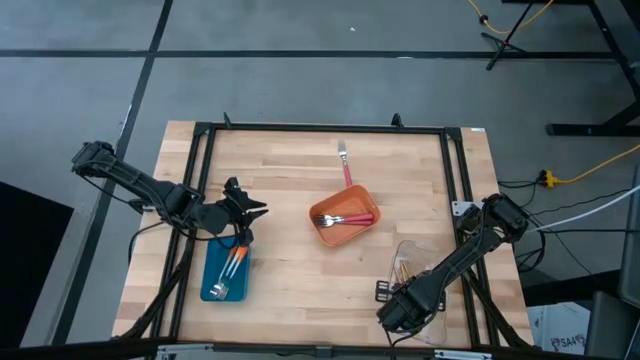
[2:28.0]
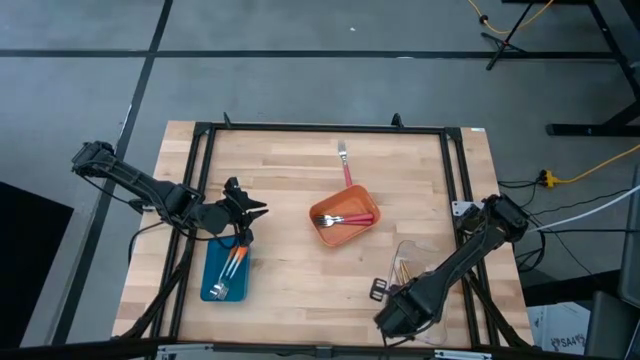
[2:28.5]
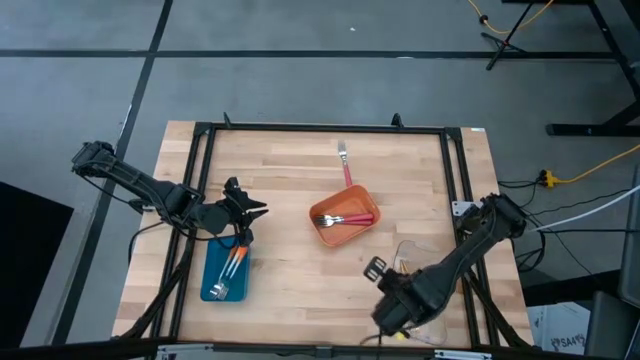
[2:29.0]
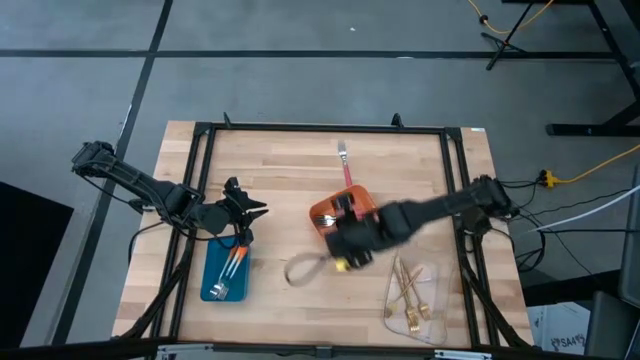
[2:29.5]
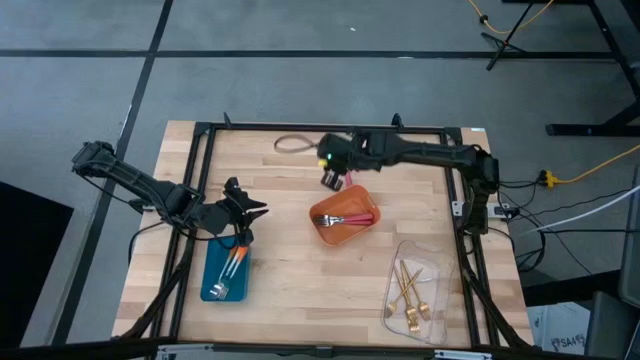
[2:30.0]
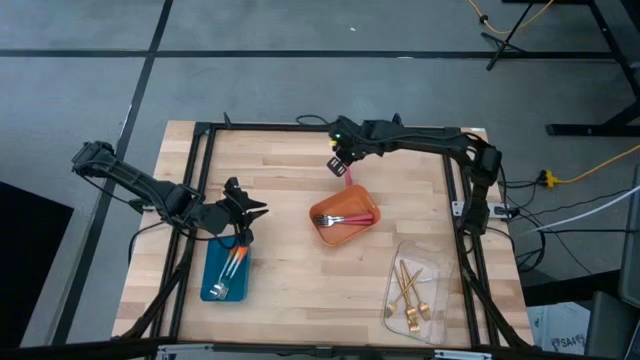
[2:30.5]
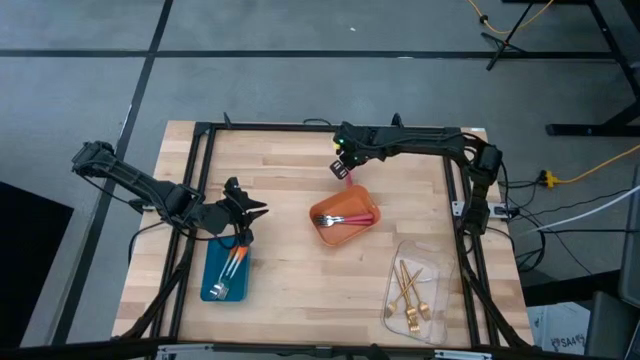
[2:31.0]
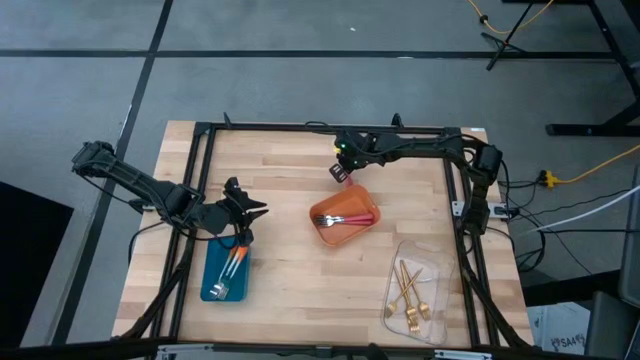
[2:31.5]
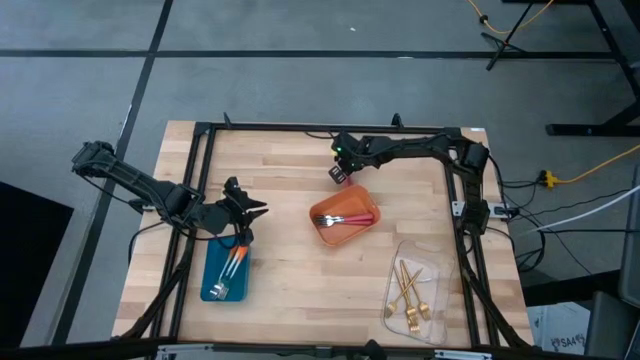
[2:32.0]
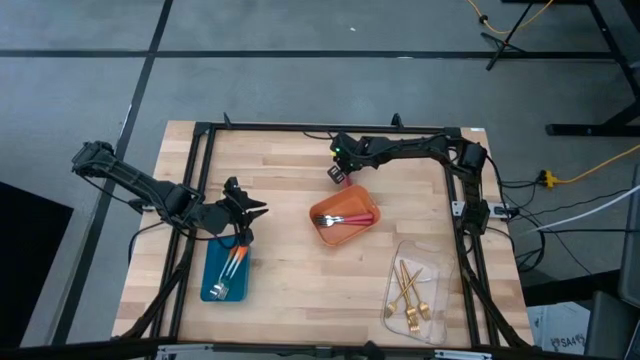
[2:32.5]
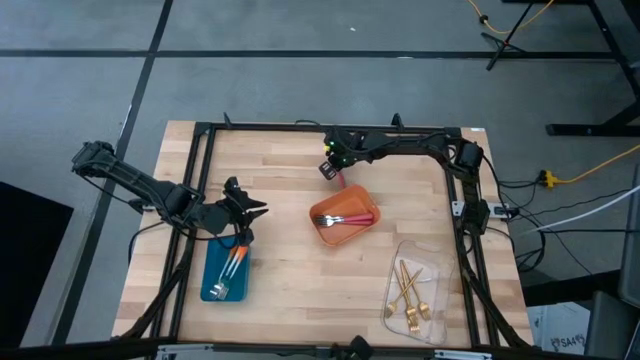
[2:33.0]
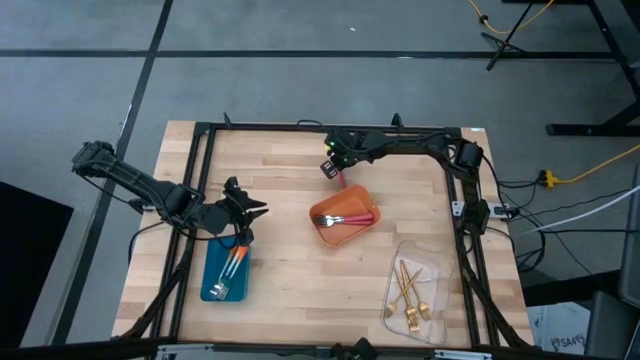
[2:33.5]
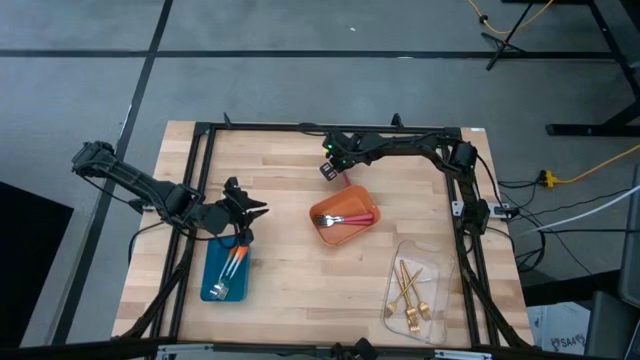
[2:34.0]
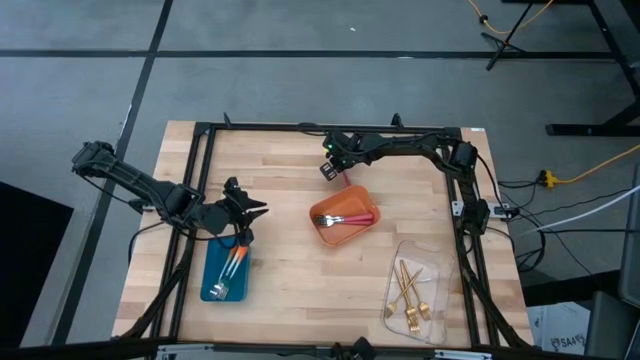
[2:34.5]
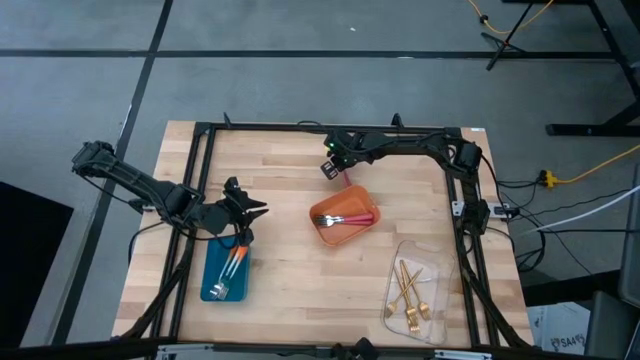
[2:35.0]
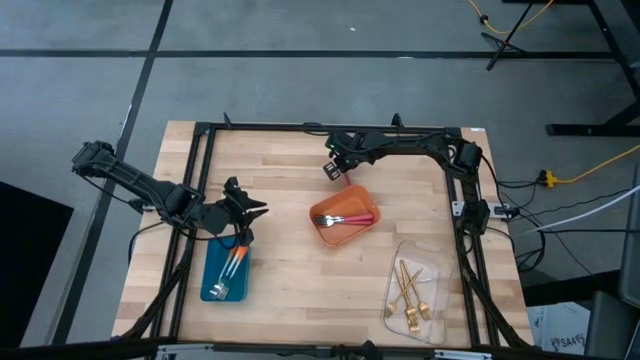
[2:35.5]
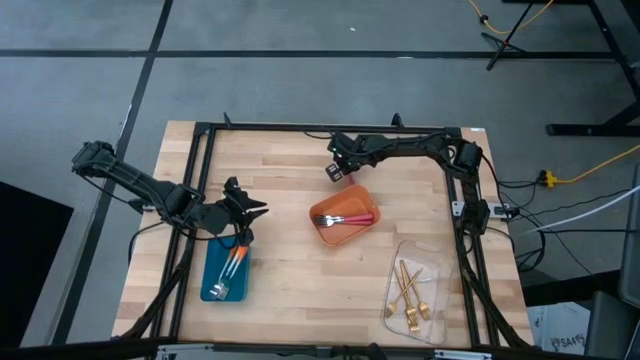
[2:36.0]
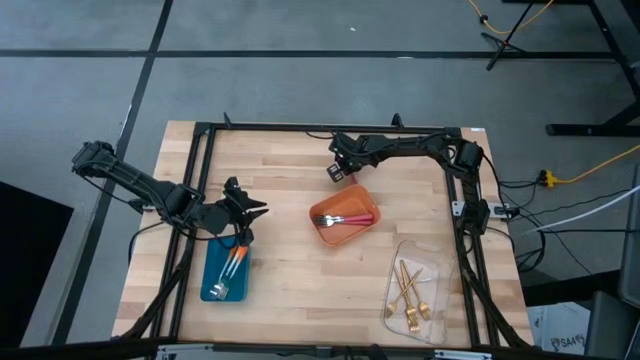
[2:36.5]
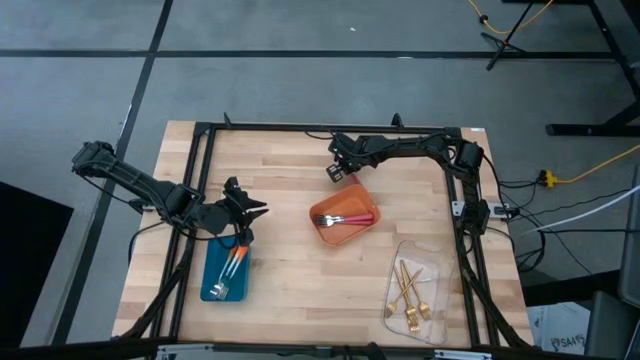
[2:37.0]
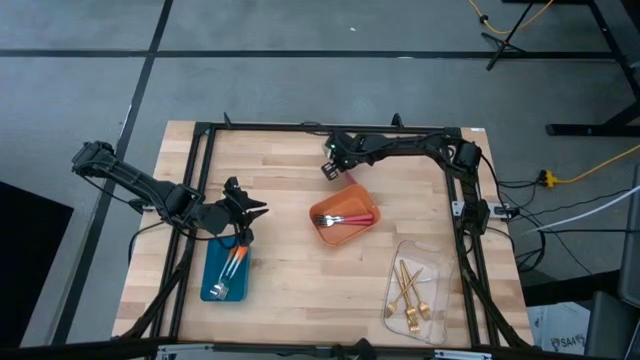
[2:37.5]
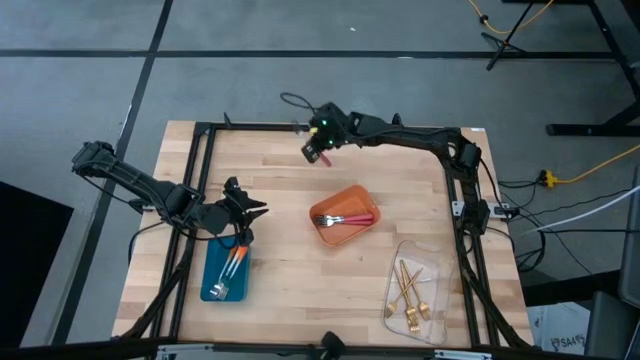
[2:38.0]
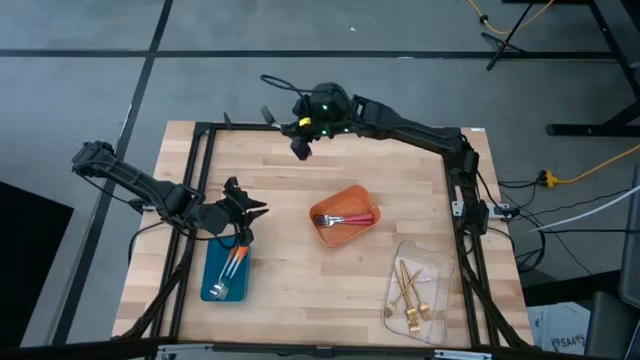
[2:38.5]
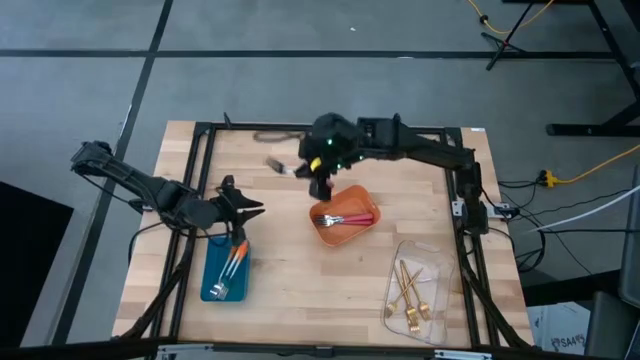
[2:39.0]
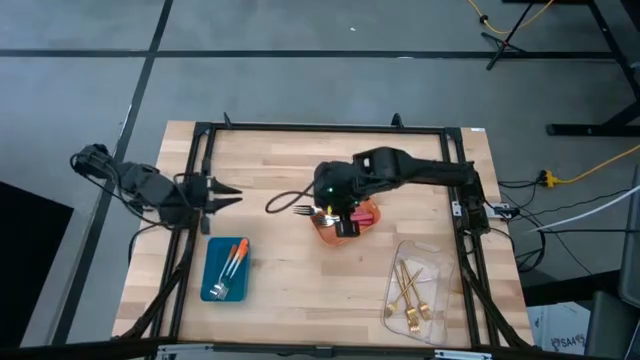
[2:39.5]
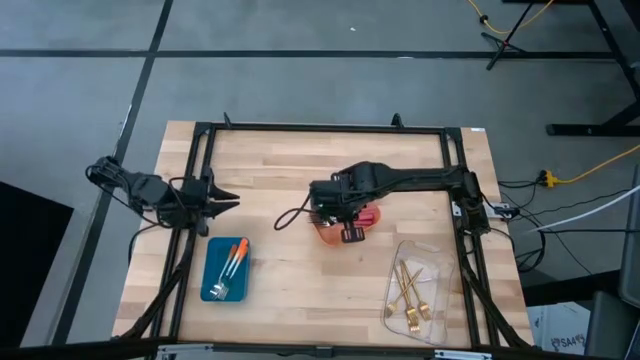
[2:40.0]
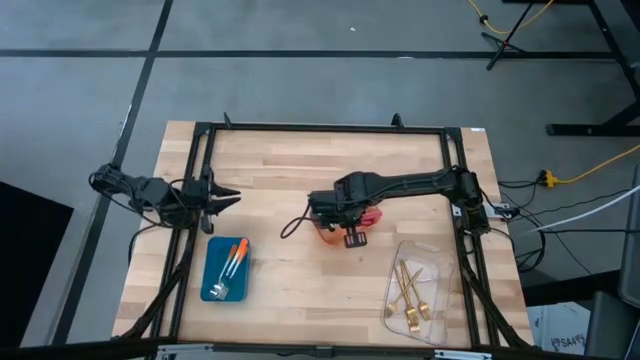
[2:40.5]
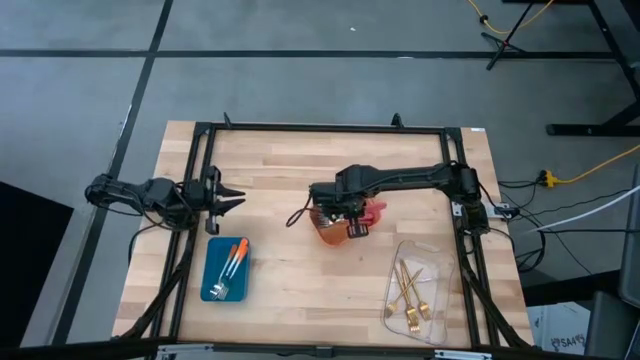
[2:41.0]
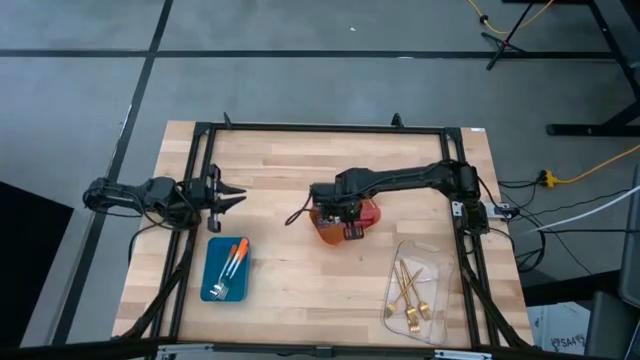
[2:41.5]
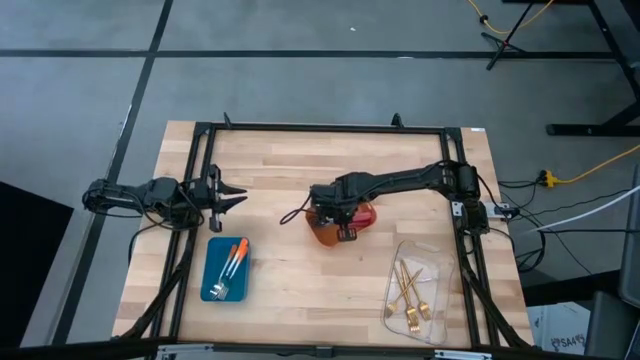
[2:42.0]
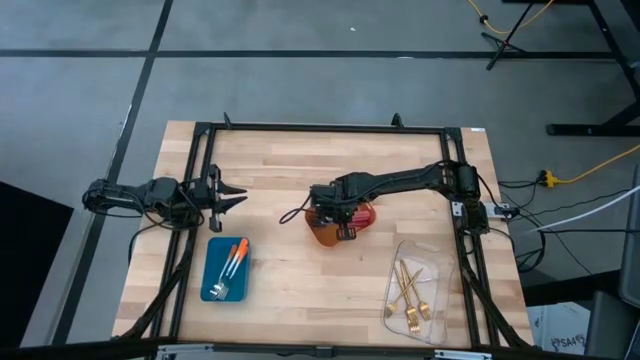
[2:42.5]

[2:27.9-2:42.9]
Task: Sort silverware by color (type)
Put the pink fork into the orange bin

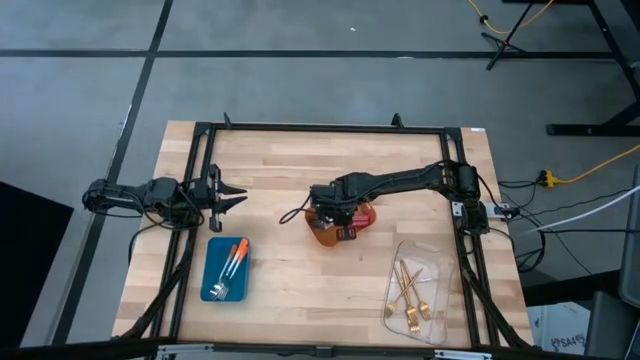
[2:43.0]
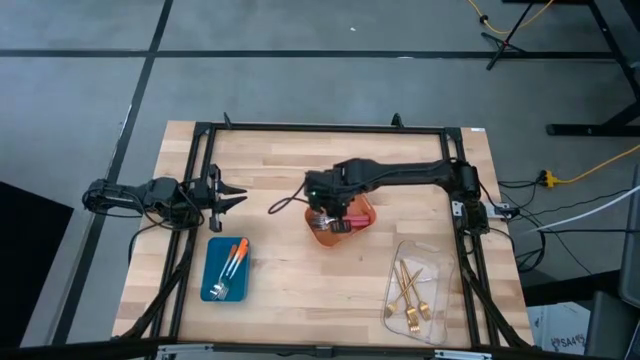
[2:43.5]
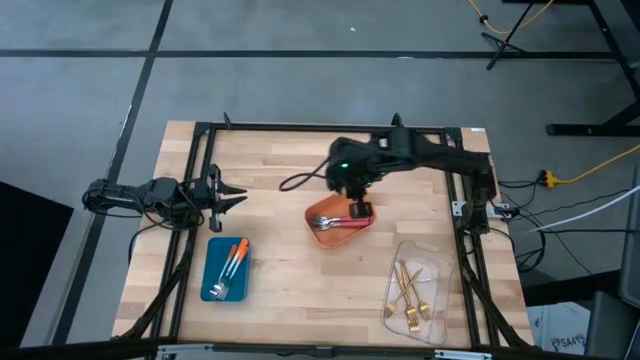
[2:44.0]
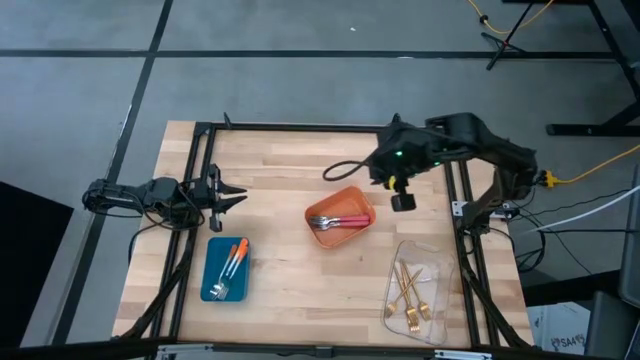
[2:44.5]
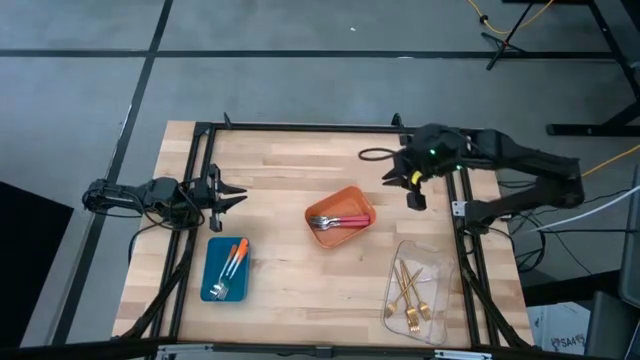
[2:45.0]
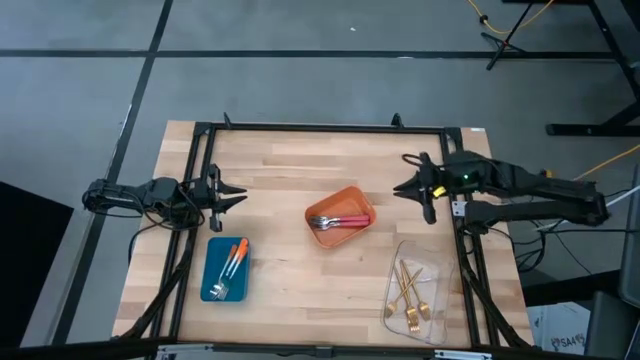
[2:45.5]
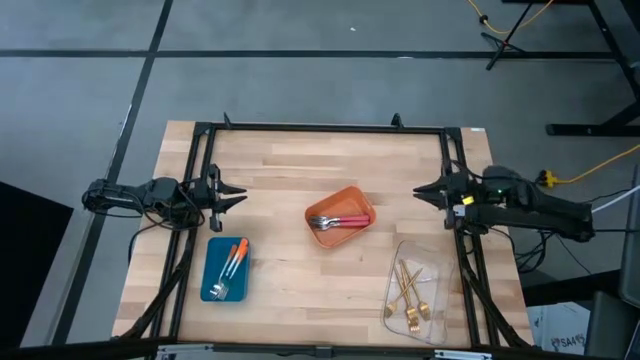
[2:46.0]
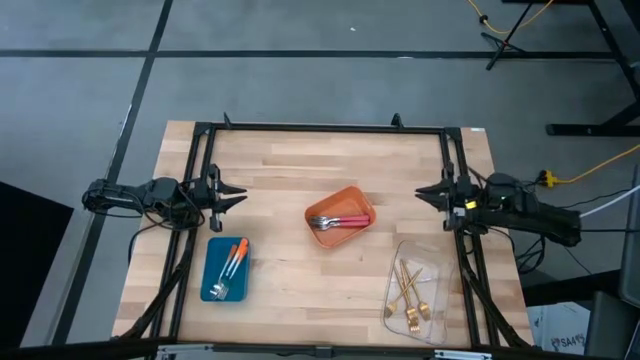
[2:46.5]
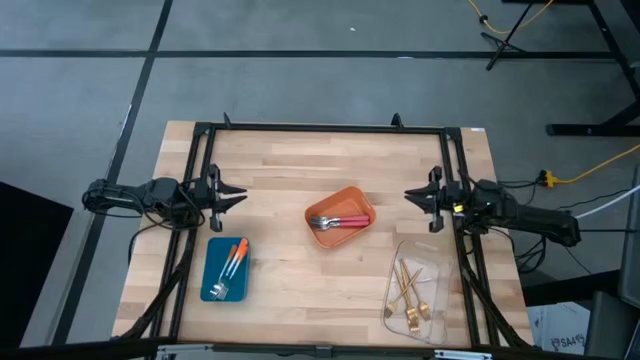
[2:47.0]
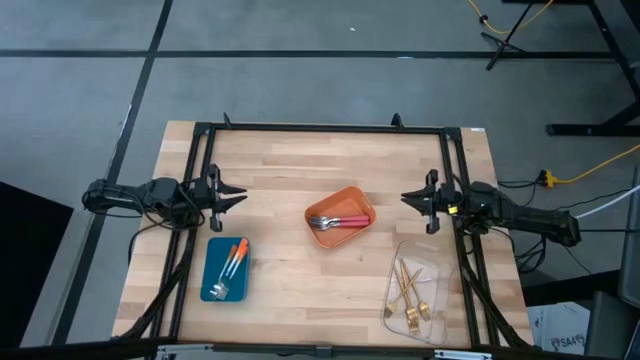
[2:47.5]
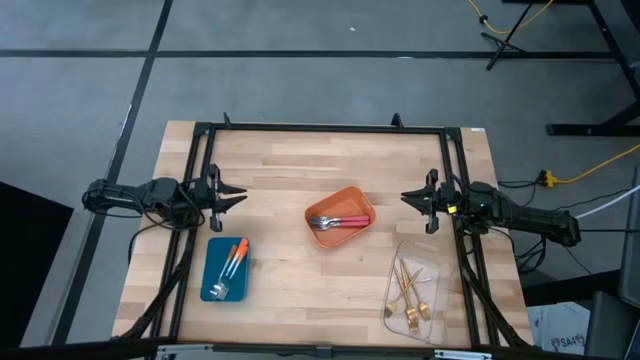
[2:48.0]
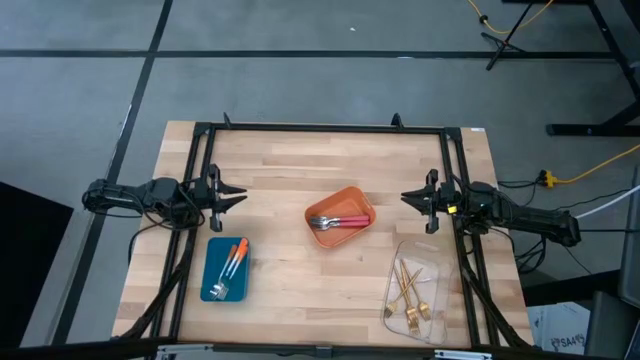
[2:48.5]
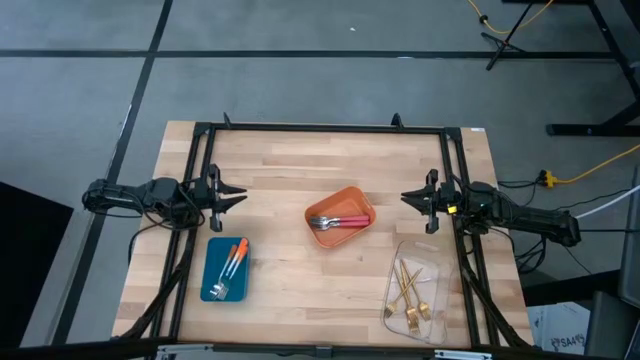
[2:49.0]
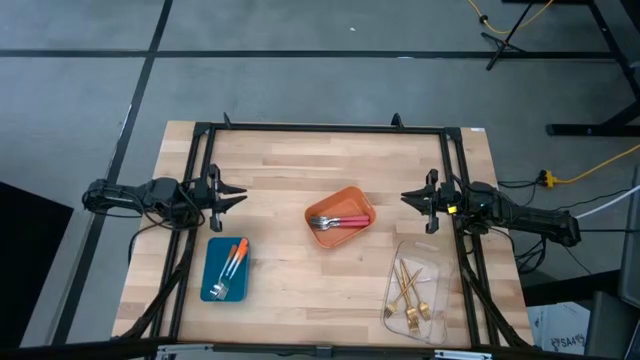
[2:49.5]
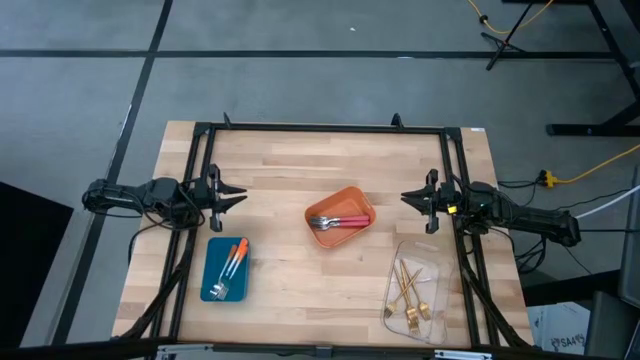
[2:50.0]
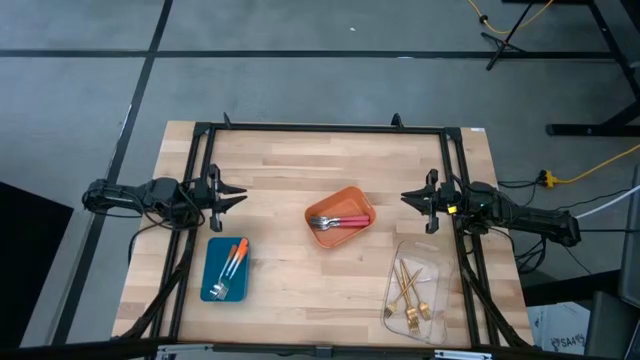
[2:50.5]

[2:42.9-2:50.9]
Return to Home Position
